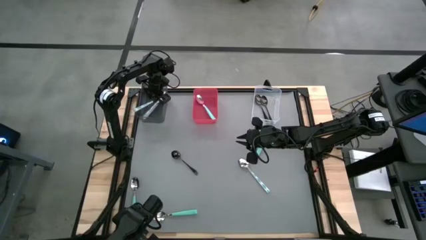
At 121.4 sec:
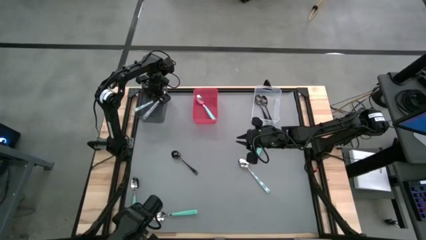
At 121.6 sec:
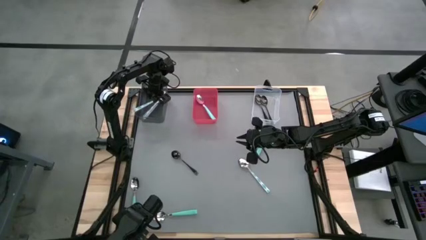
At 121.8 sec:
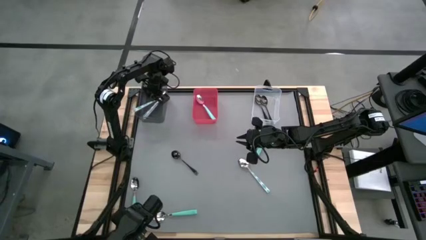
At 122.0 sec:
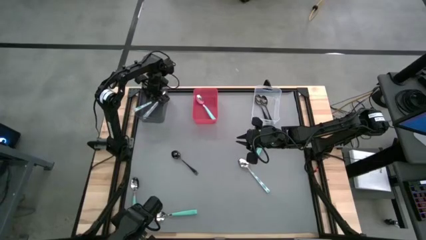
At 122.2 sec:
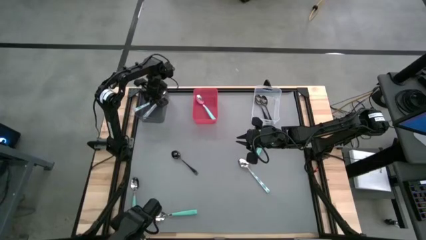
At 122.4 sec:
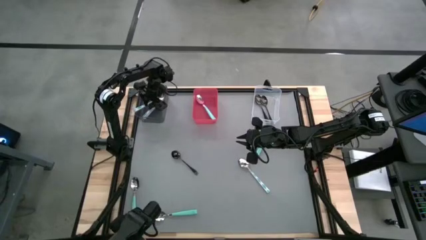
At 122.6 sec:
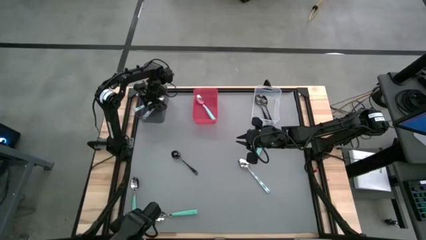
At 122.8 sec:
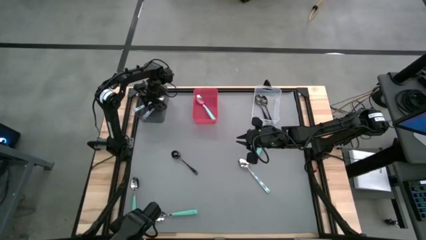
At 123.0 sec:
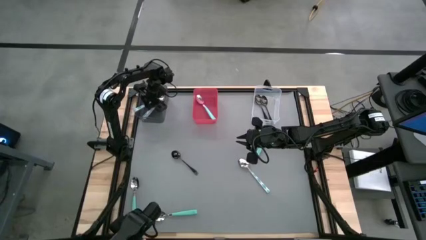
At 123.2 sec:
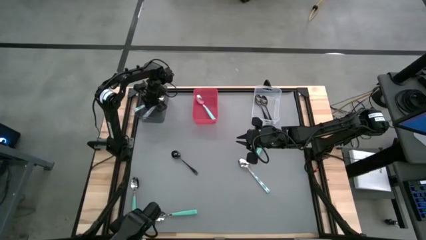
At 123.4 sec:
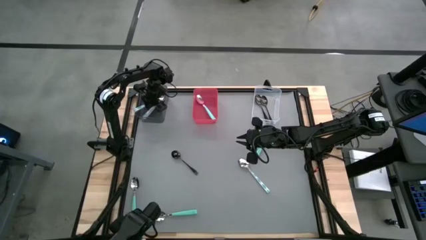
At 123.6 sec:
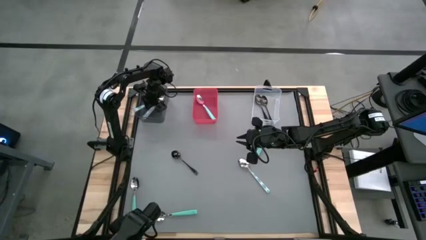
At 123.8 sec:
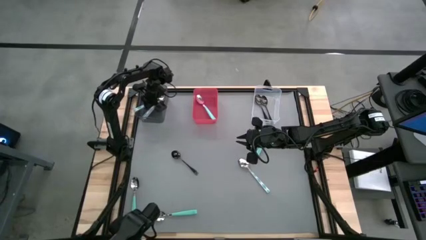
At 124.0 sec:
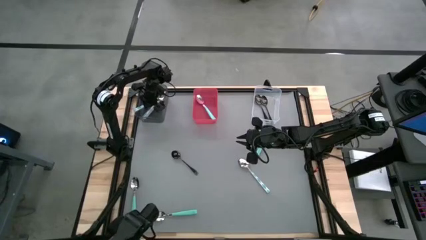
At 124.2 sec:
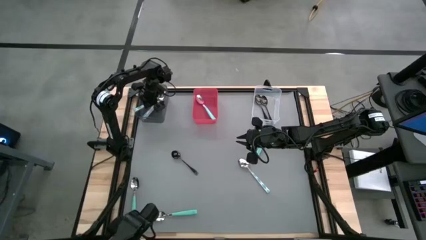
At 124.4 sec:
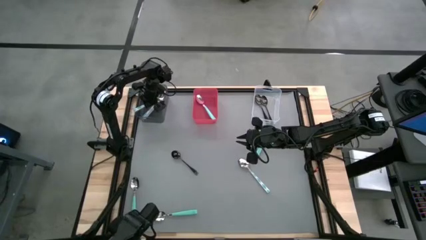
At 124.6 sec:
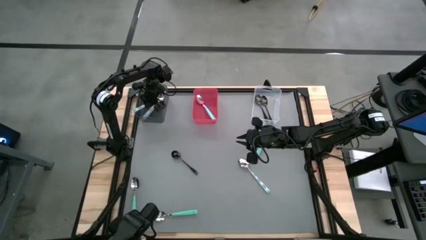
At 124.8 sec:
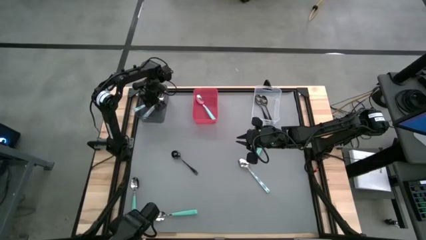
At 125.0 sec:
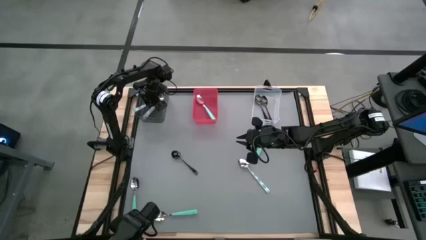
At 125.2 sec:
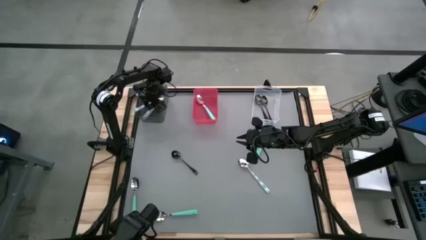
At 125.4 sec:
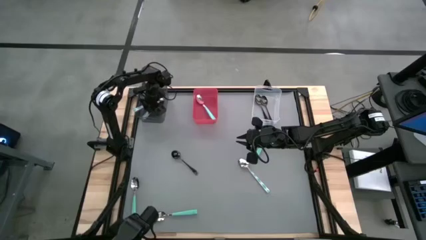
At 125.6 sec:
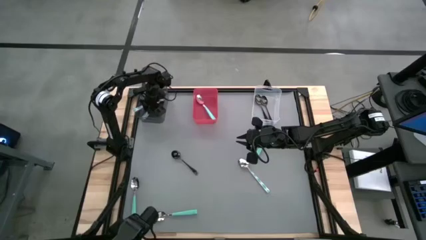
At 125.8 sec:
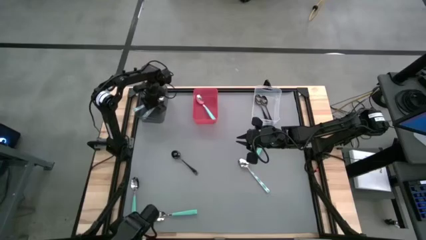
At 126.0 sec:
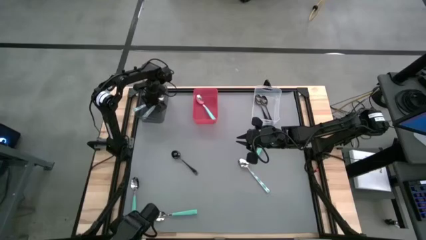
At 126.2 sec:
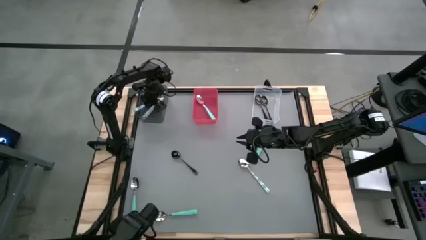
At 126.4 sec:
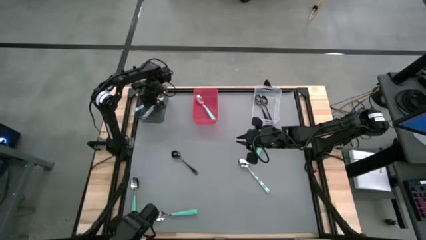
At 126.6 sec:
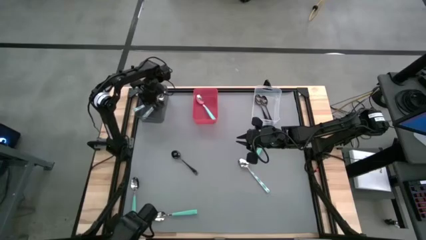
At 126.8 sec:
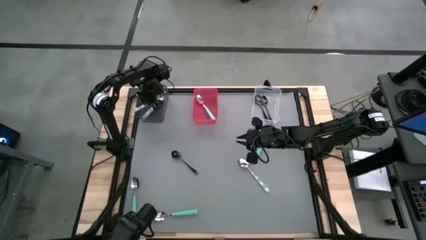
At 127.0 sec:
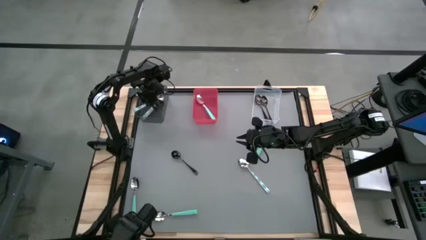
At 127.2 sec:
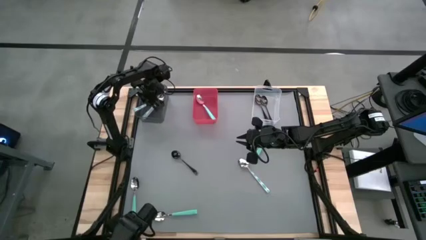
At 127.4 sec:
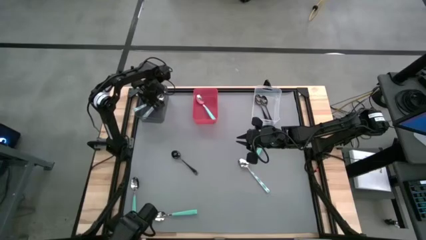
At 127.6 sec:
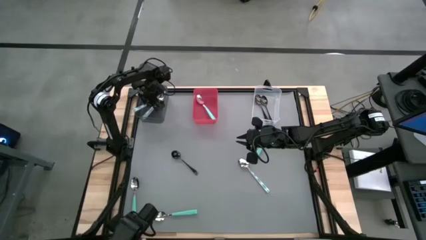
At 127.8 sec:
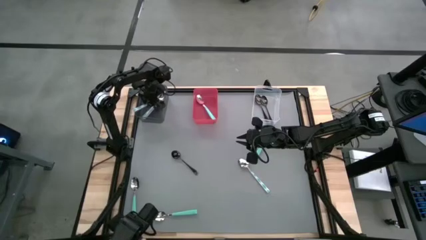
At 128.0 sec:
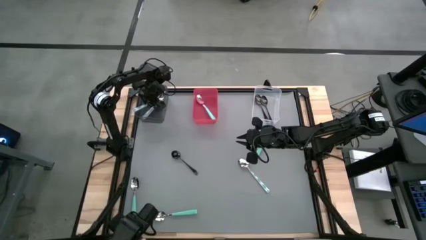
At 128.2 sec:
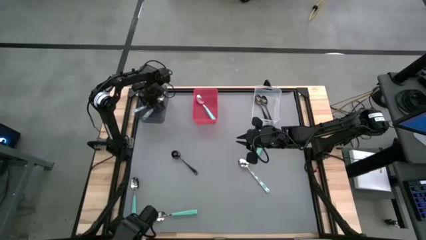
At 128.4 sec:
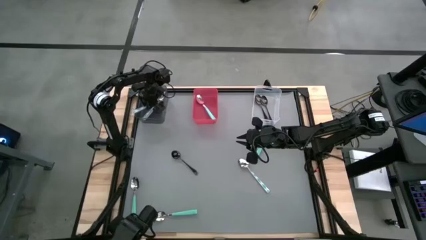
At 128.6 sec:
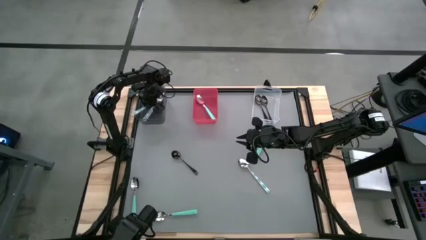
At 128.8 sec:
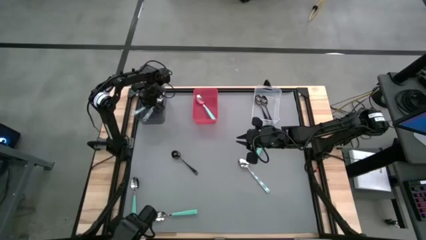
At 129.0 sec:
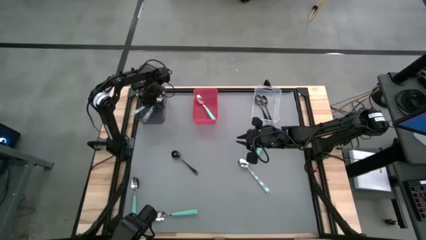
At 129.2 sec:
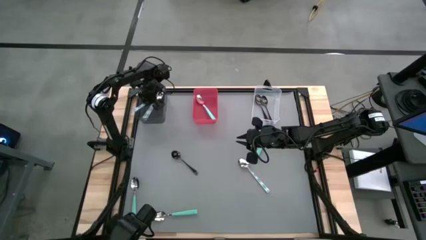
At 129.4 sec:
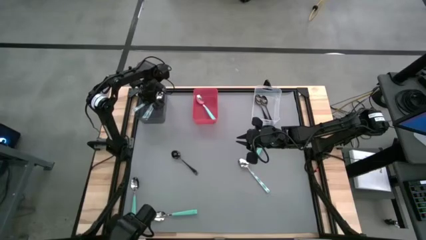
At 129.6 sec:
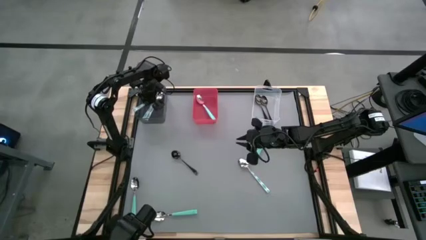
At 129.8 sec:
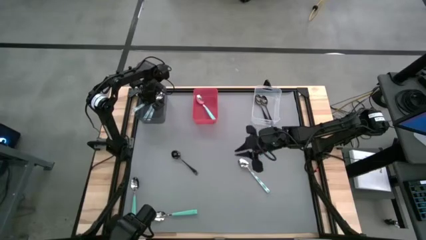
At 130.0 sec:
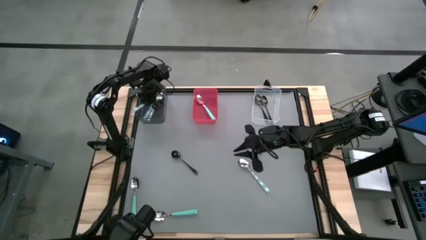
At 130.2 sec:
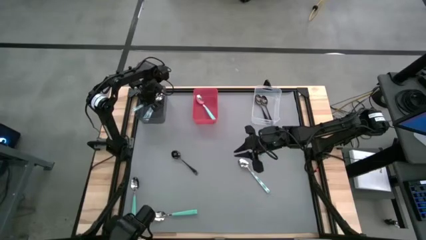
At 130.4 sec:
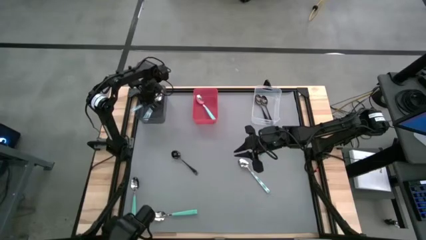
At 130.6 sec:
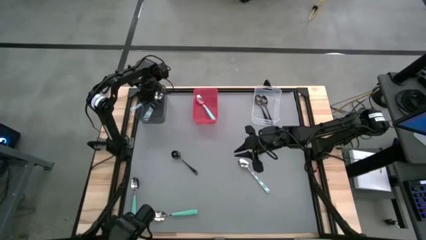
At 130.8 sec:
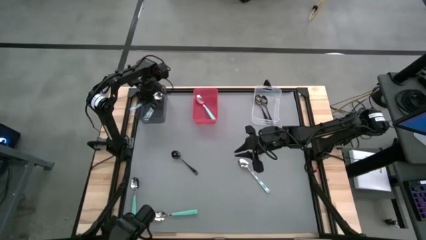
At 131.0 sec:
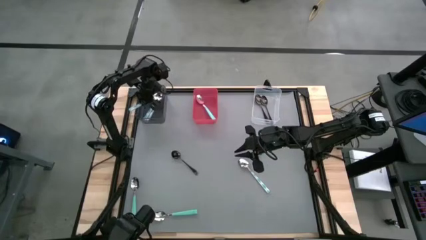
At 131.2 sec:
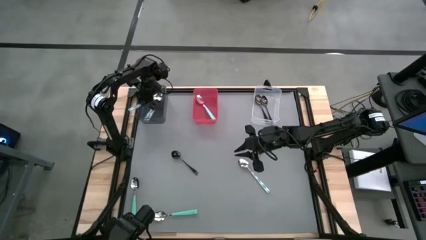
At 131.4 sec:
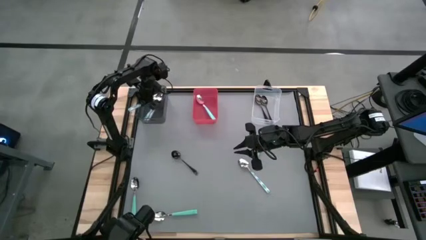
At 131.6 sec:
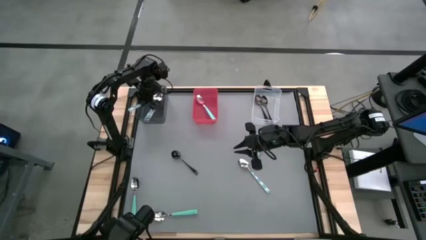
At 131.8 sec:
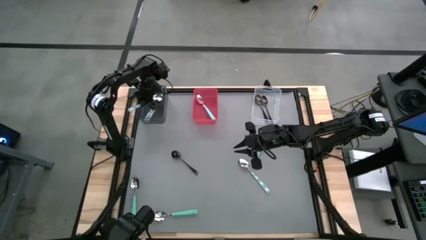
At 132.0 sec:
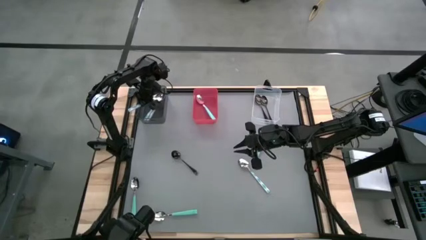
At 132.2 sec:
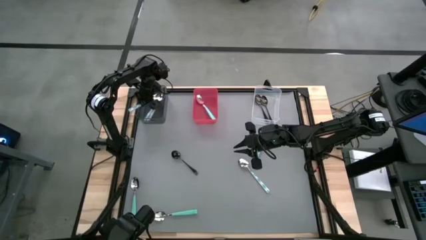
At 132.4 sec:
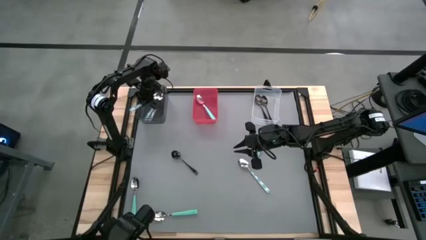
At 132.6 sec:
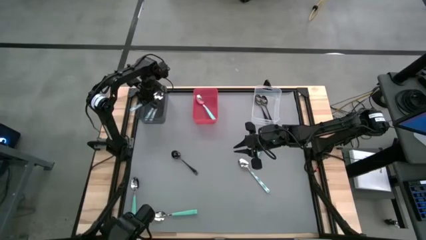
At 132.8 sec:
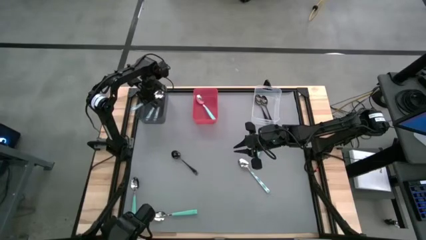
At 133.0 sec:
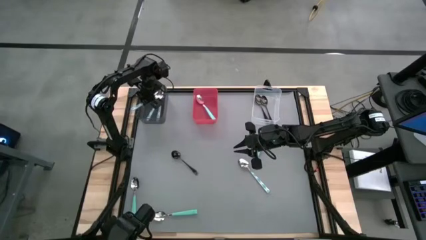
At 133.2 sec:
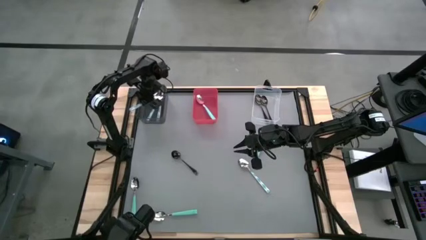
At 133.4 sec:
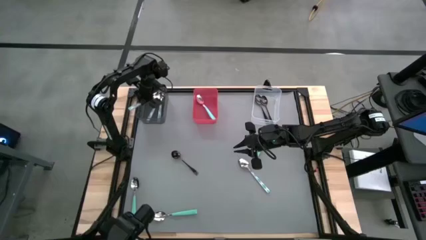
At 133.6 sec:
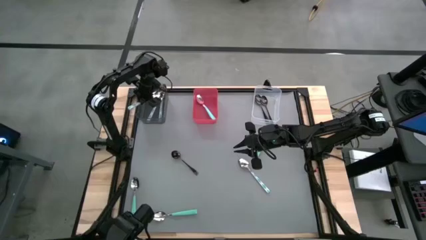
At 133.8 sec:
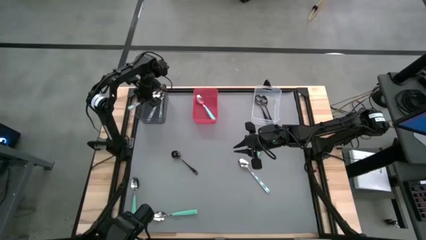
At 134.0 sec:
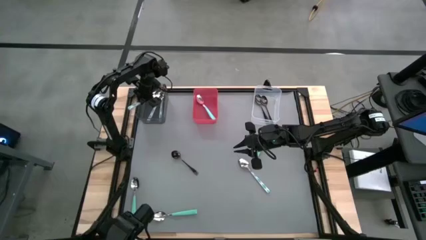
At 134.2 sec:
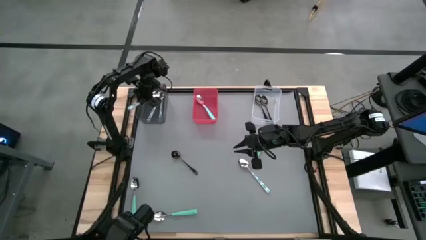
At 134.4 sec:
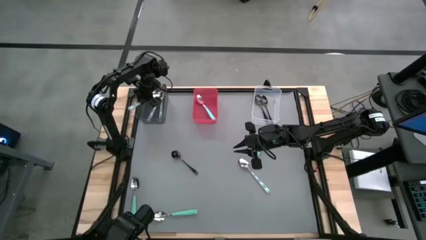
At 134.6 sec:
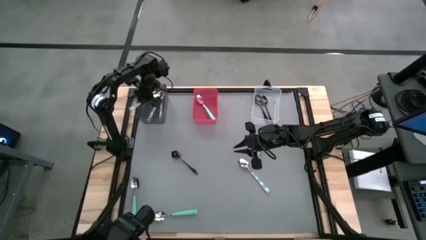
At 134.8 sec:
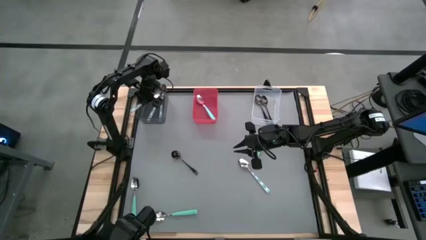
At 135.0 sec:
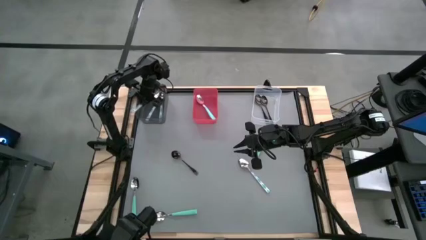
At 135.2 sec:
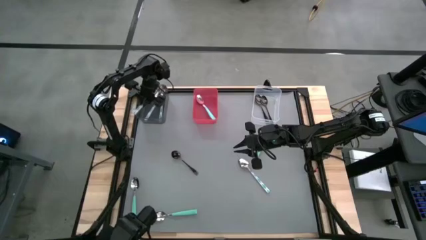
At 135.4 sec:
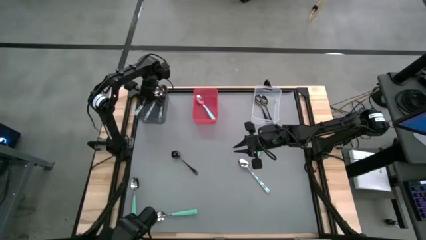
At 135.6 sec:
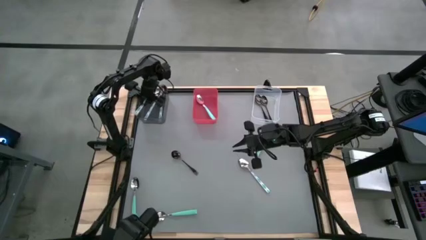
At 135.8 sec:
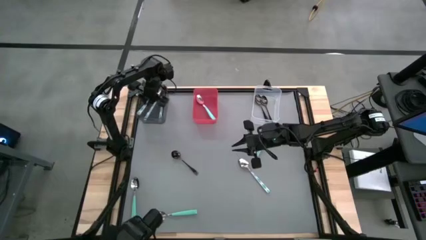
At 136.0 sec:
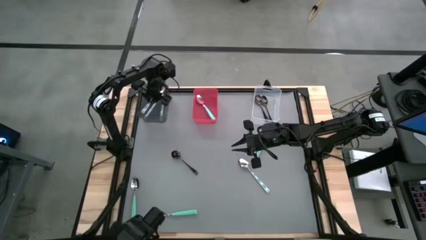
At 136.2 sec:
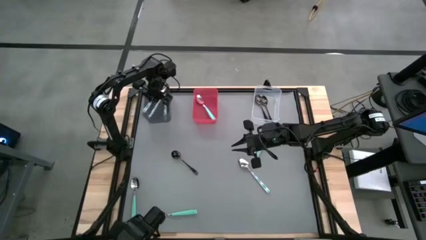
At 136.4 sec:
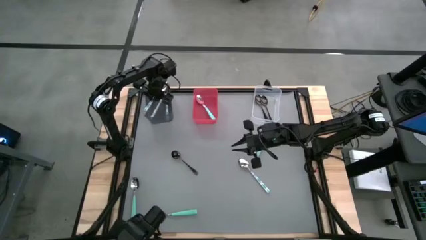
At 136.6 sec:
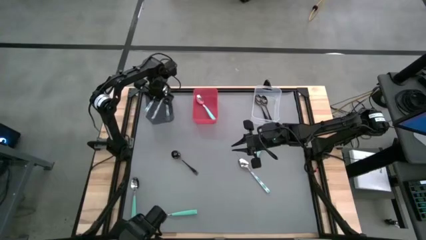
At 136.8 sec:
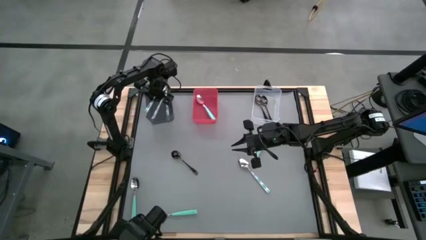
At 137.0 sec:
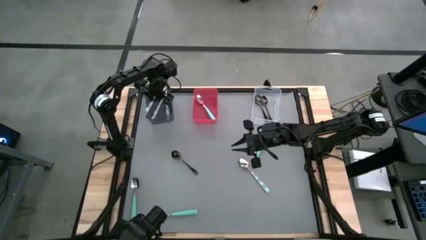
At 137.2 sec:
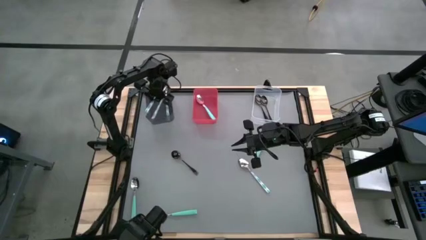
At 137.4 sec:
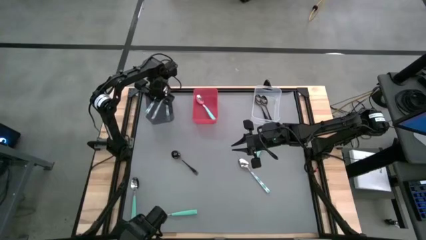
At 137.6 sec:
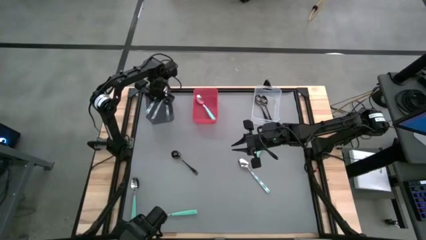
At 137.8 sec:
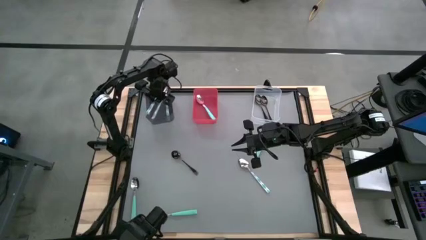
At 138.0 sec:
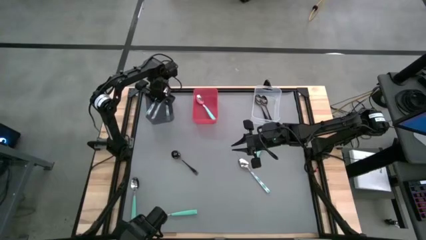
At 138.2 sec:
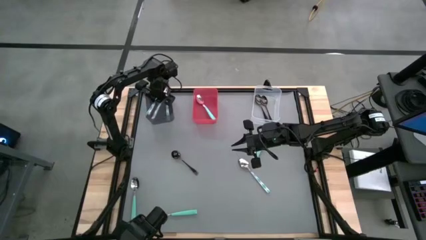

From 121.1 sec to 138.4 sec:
Task: Sort silverware by color (type)
Adjust the patterned spoon on the black bin
